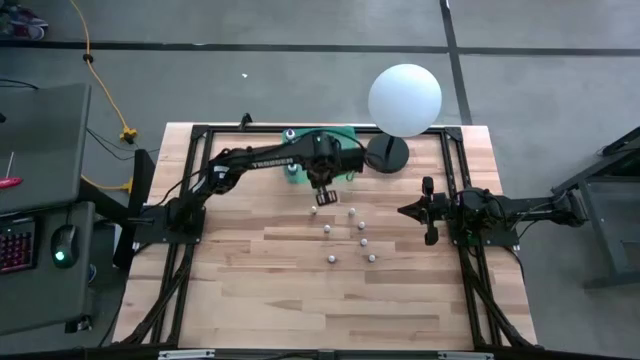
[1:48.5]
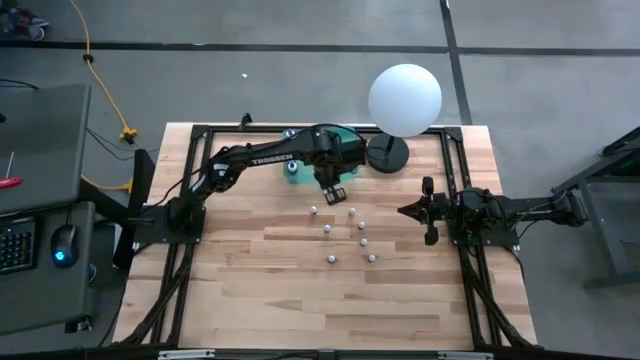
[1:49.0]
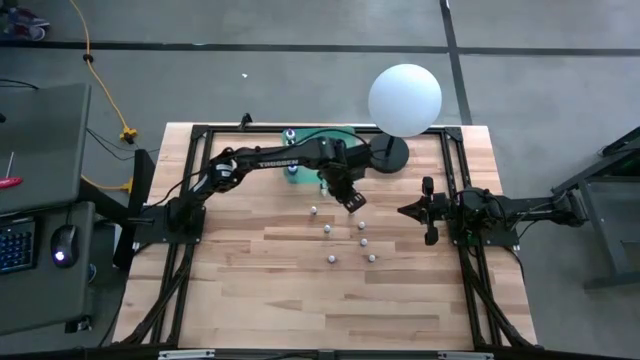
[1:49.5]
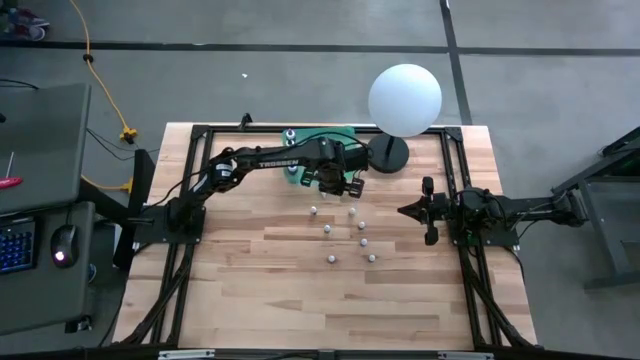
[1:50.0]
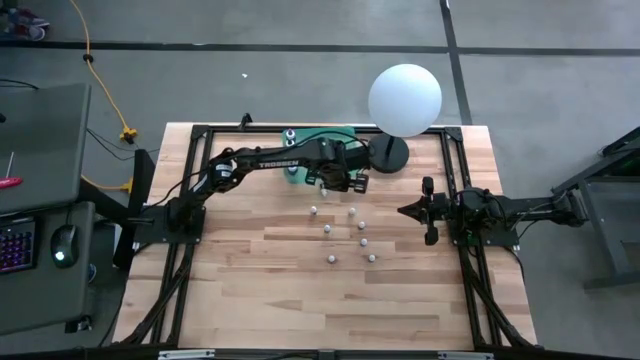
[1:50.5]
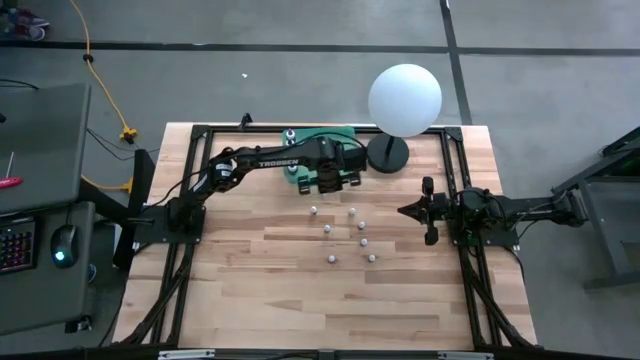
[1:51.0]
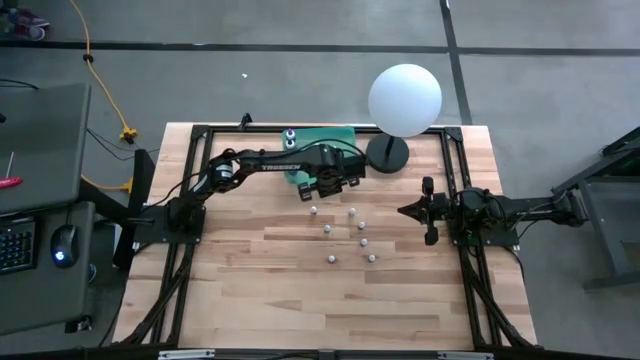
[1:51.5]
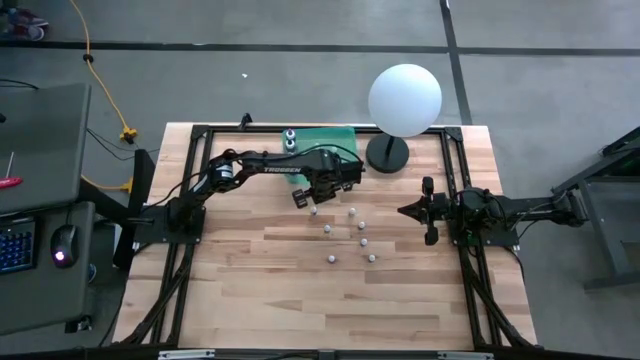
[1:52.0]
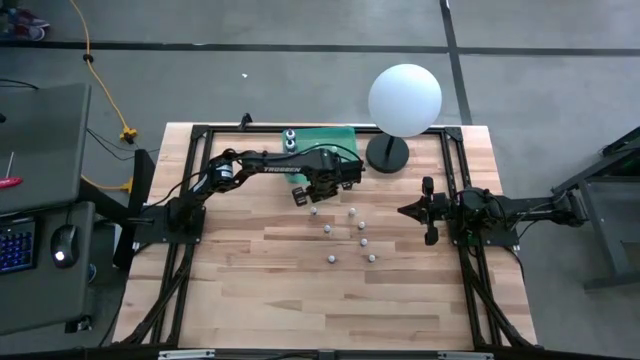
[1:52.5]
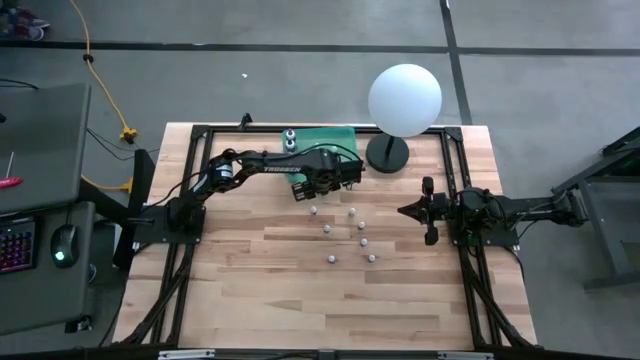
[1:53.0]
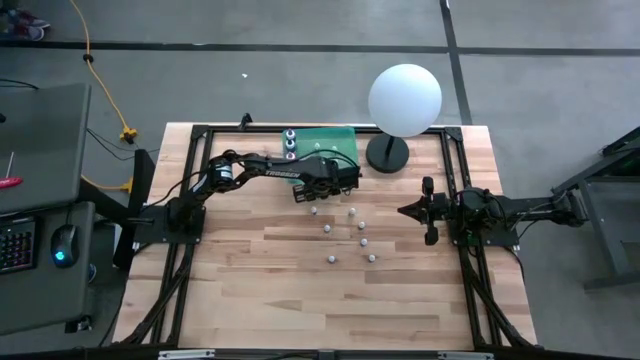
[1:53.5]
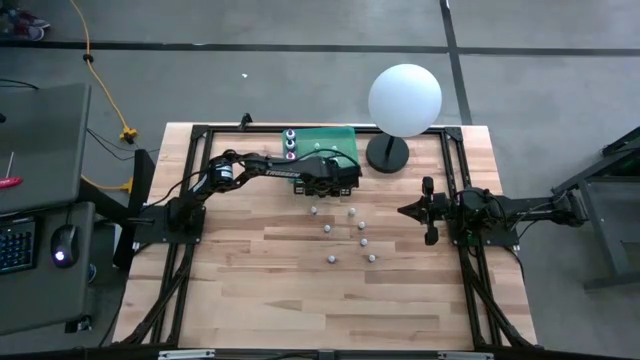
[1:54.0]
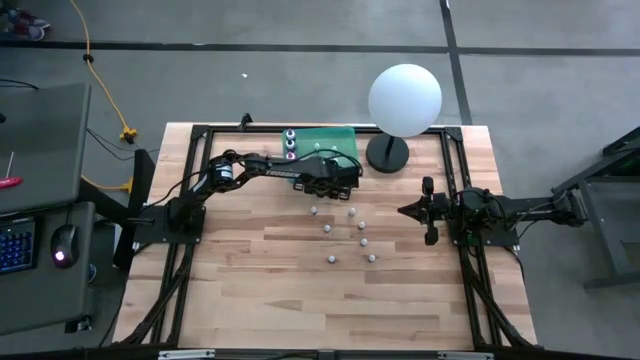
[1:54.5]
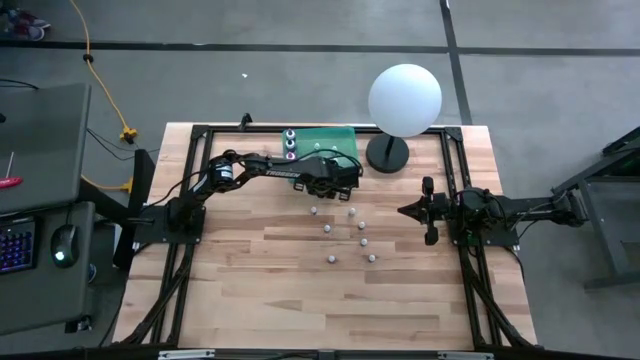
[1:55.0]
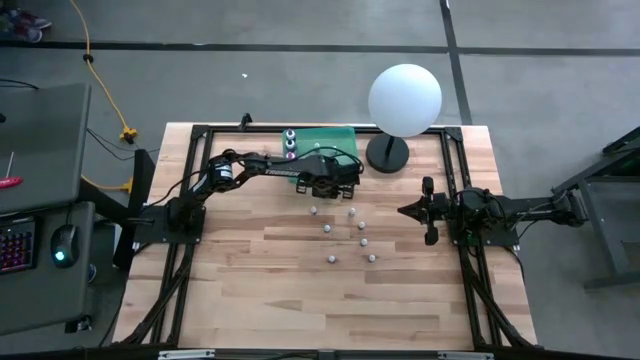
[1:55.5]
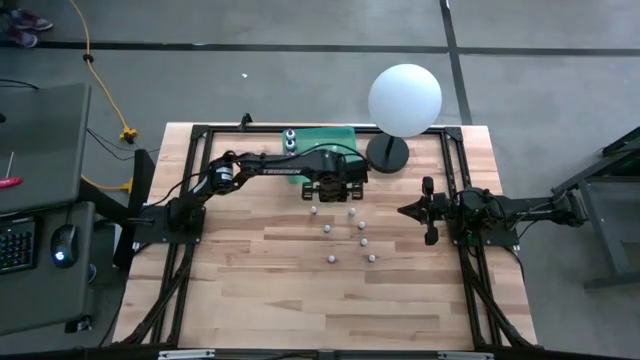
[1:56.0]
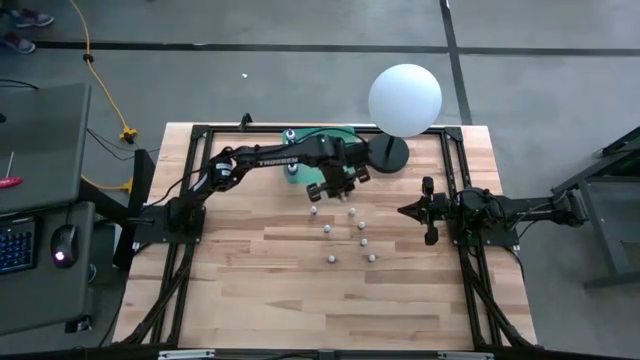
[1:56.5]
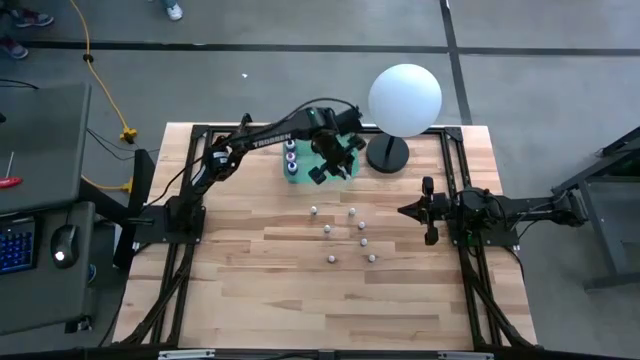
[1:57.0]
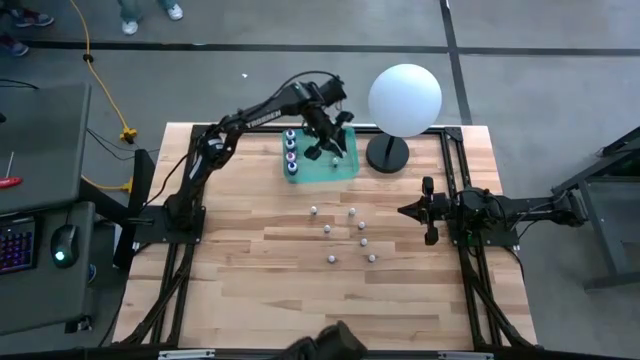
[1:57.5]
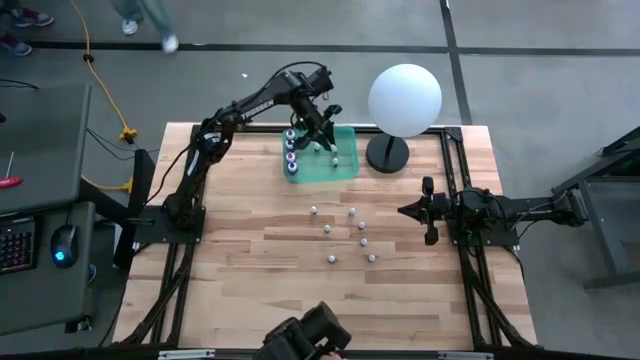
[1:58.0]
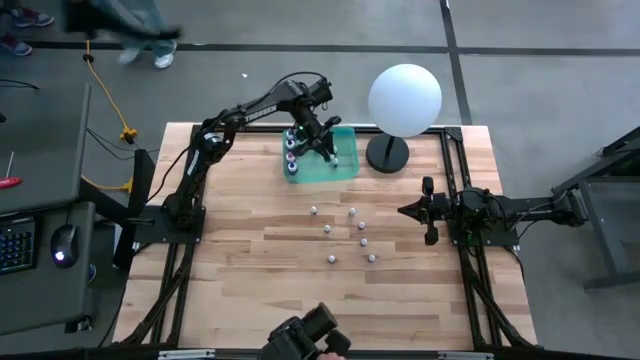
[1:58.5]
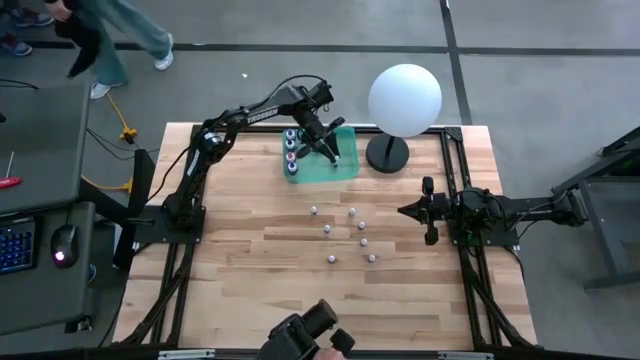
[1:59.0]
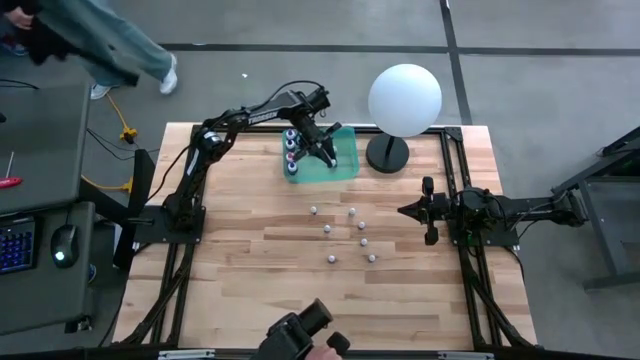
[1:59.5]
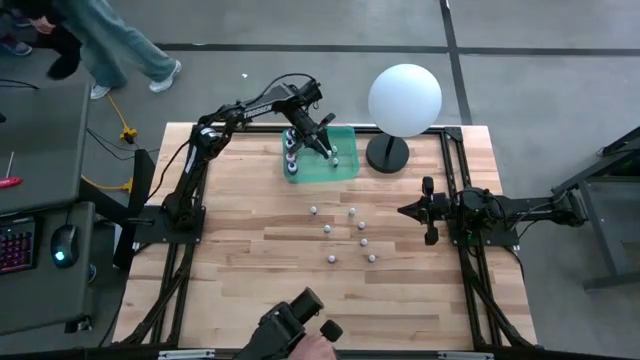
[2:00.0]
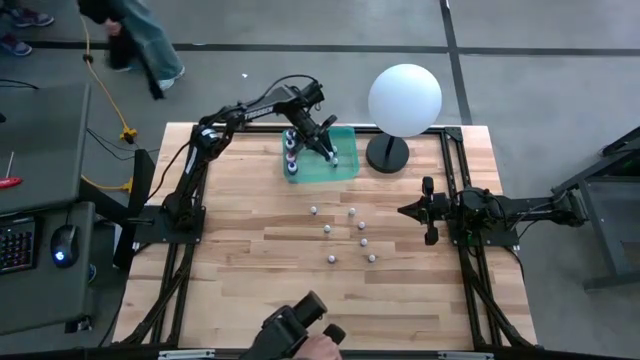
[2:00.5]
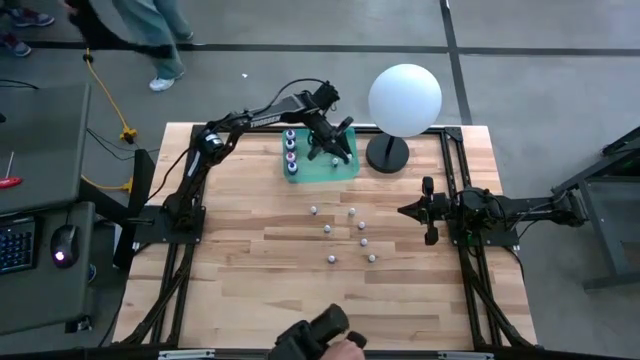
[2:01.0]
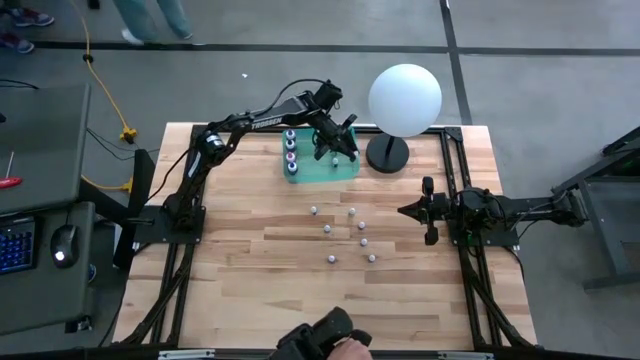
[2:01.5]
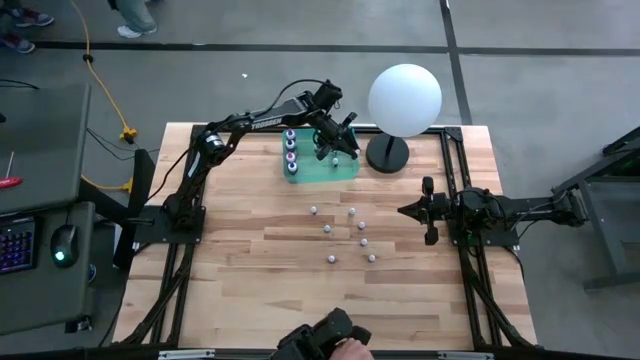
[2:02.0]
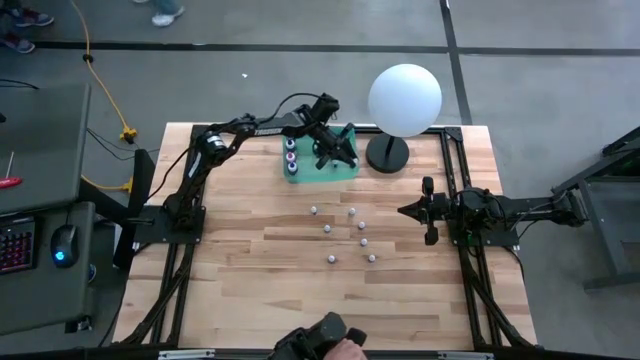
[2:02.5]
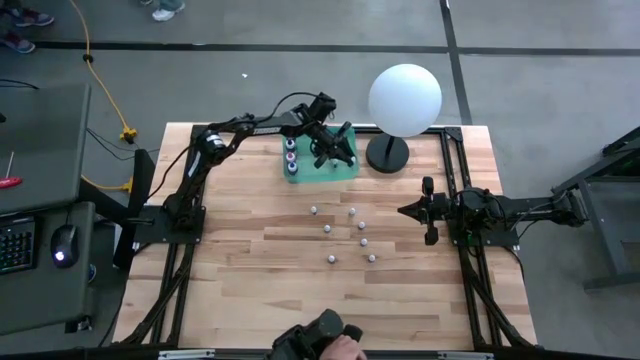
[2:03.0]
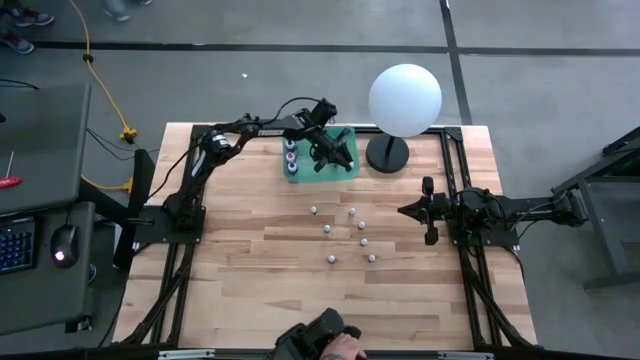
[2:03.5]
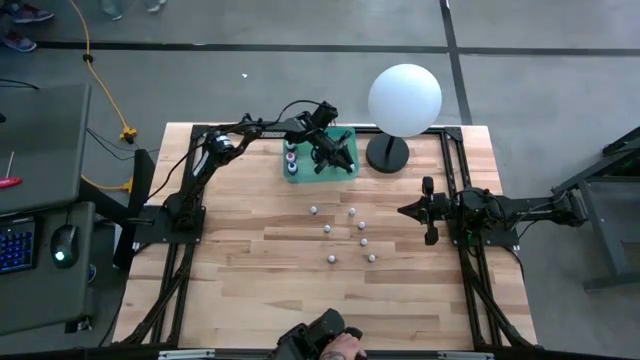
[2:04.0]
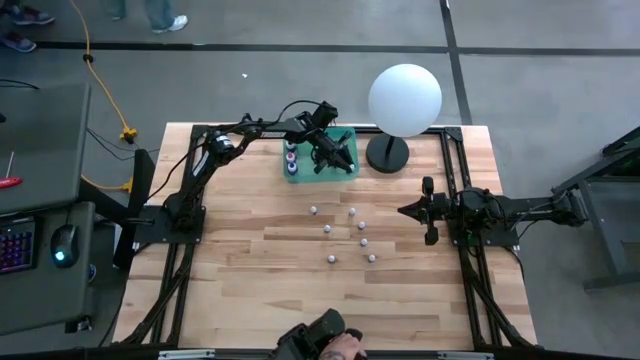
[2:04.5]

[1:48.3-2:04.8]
Task: Pick & Place food coloring
Put the small red food coloring bottle into the green bin

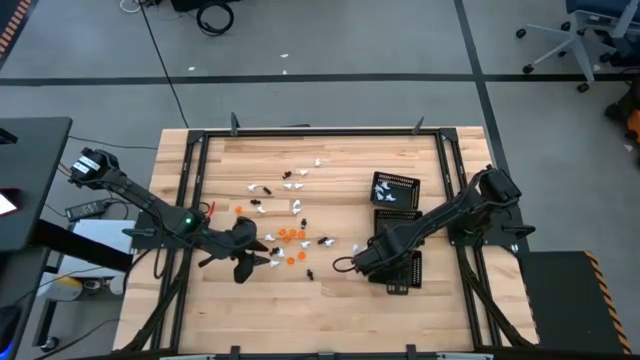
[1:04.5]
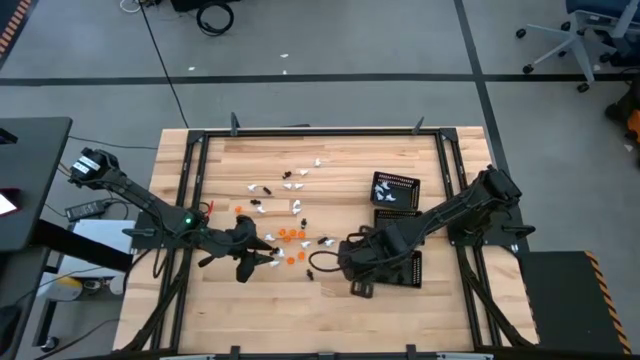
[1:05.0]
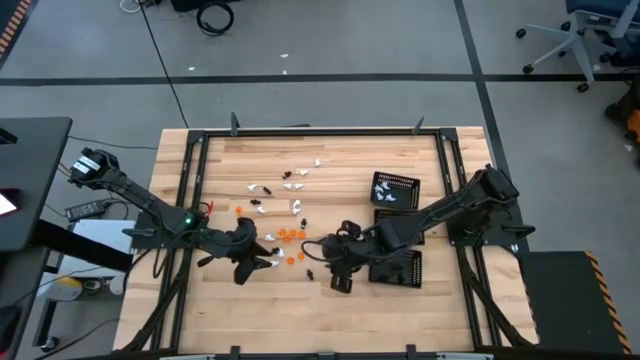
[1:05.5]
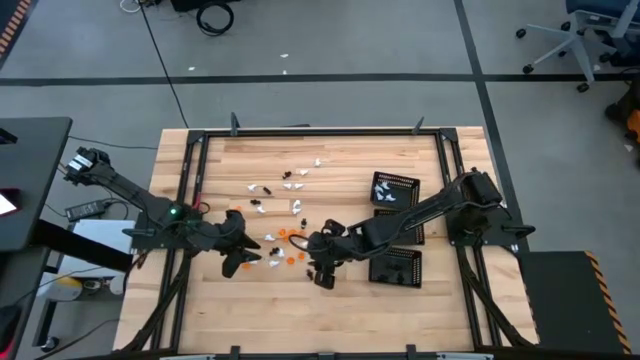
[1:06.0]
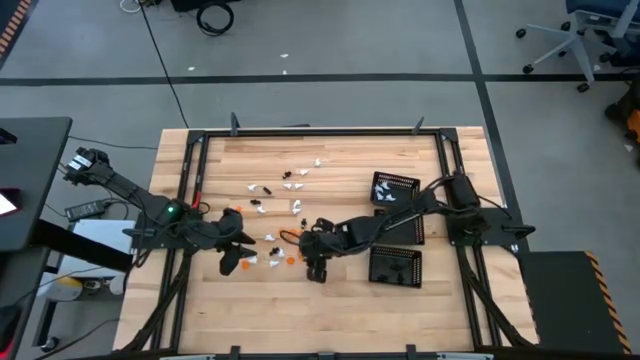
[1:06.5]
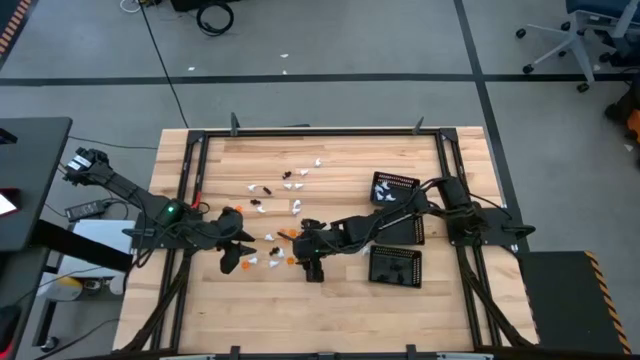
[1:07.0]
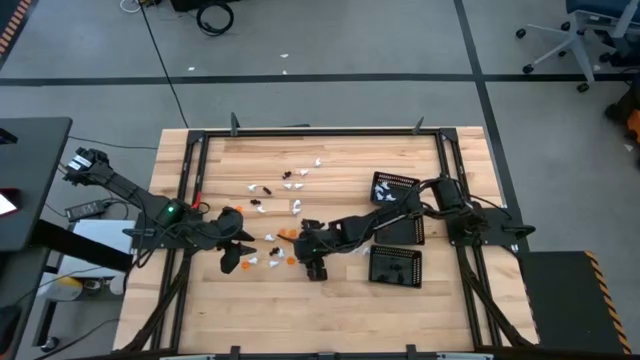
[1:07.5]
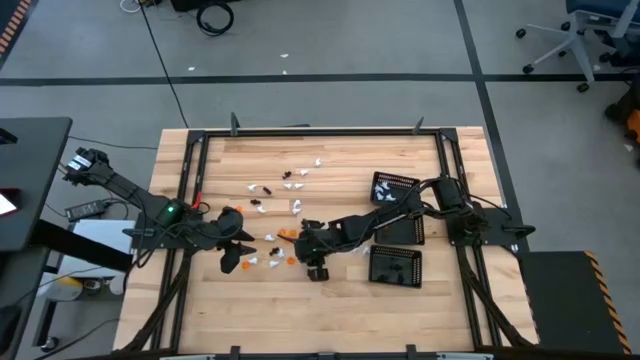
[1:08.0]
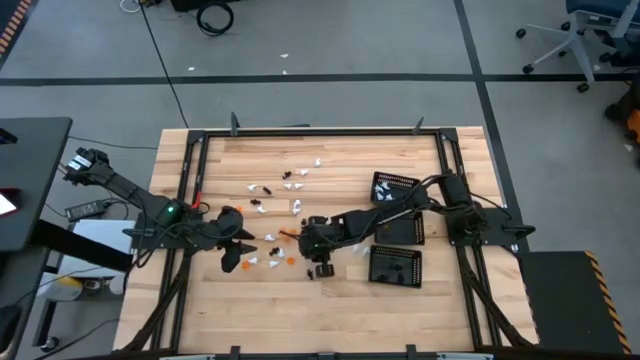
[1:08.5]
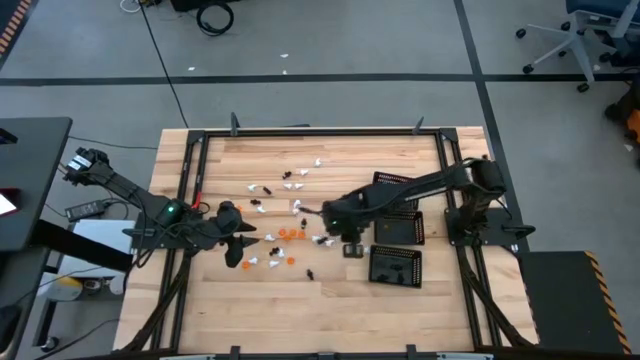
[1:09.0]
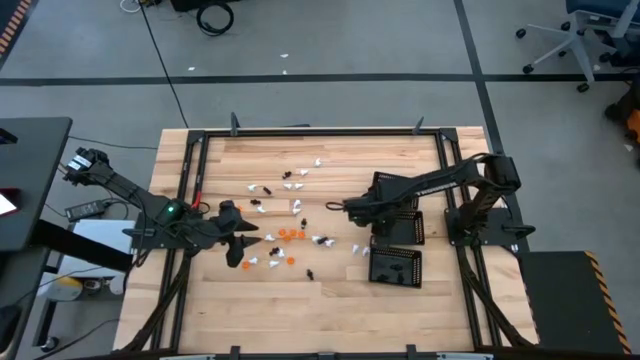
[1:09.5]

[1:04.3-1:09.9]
Task: Sort Halloween decoration
Put the orange pumpkin toy into the center black bin
